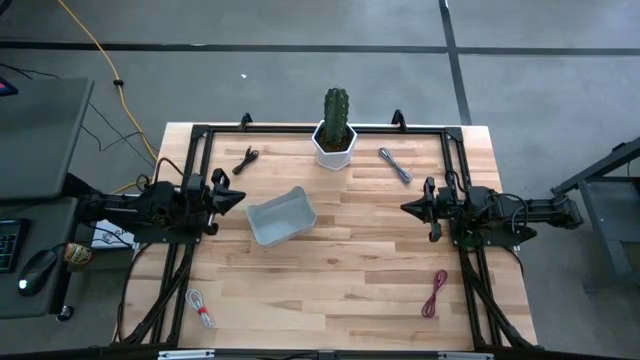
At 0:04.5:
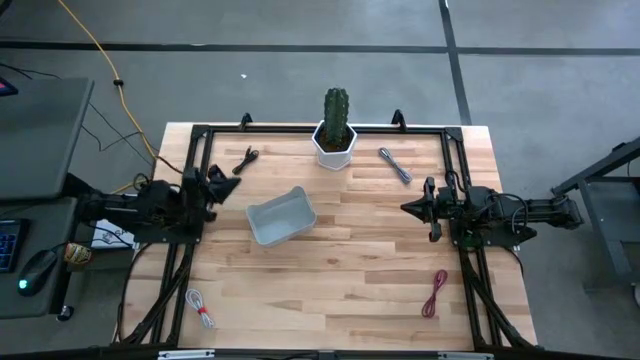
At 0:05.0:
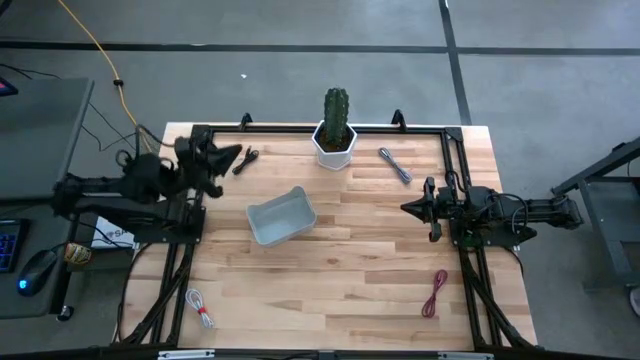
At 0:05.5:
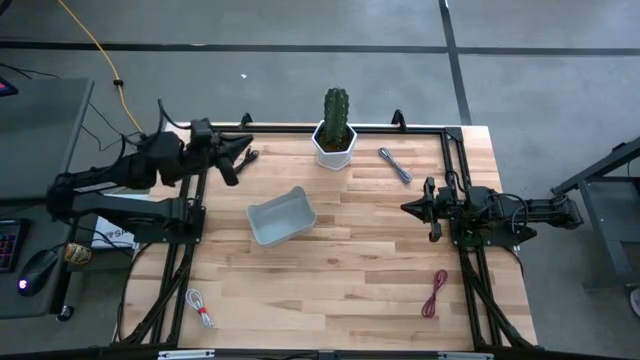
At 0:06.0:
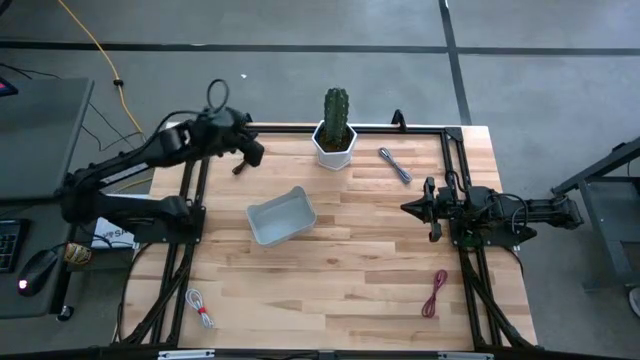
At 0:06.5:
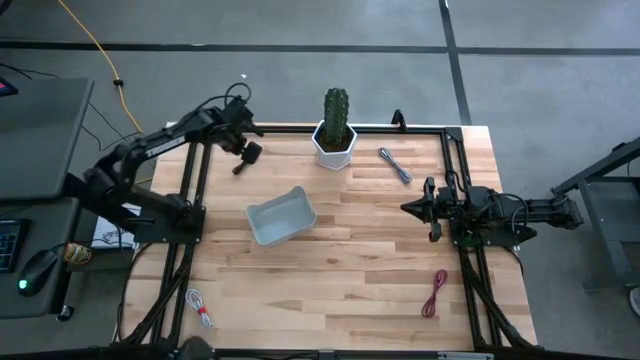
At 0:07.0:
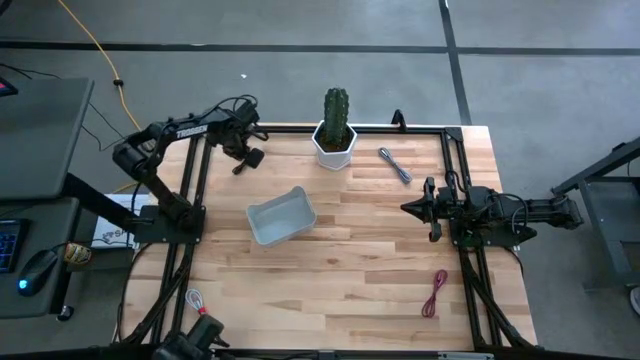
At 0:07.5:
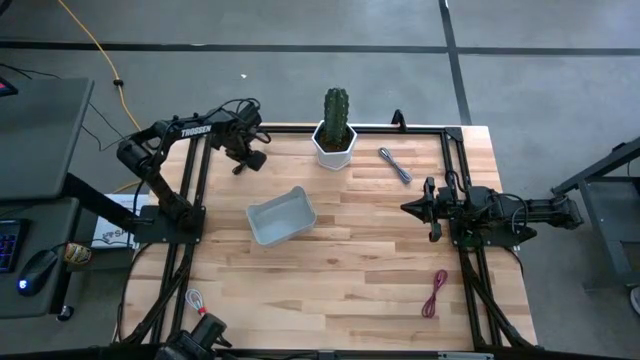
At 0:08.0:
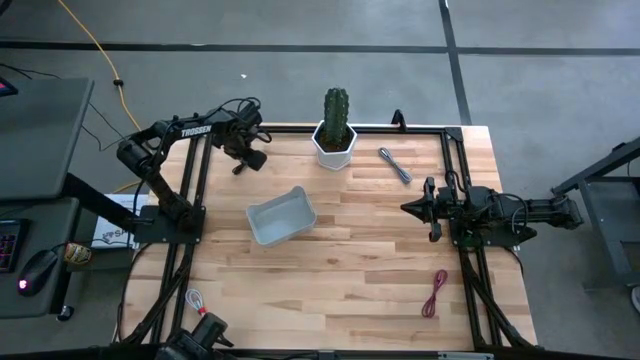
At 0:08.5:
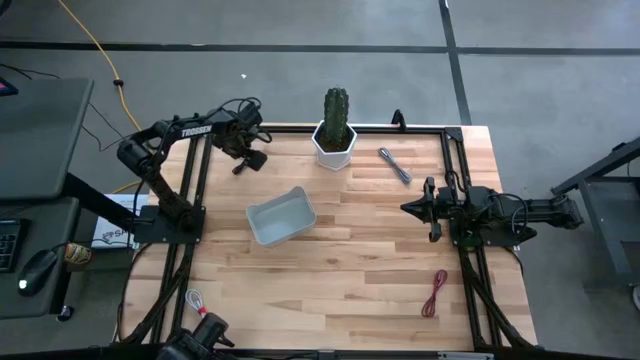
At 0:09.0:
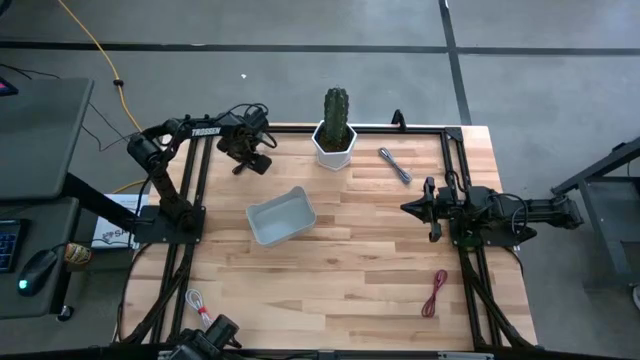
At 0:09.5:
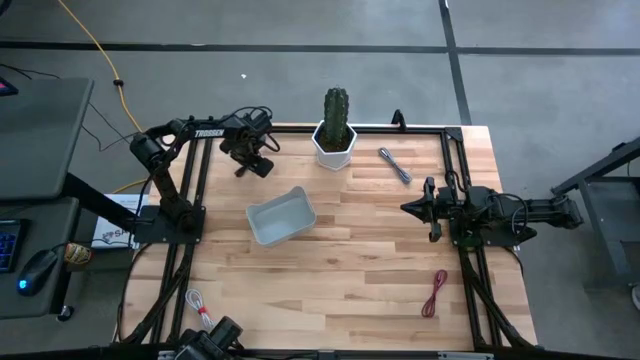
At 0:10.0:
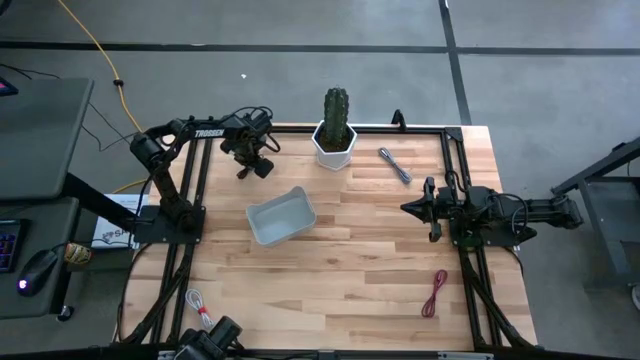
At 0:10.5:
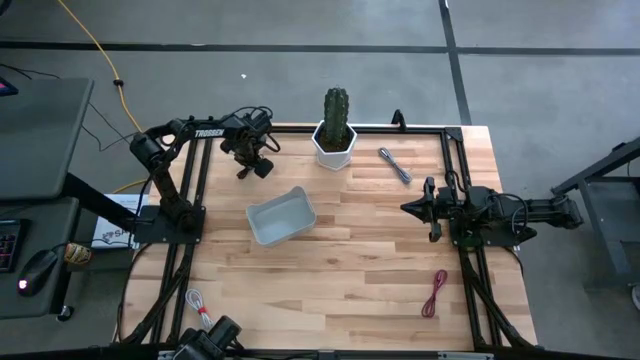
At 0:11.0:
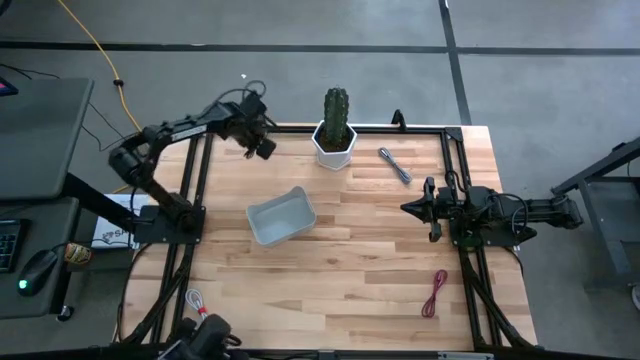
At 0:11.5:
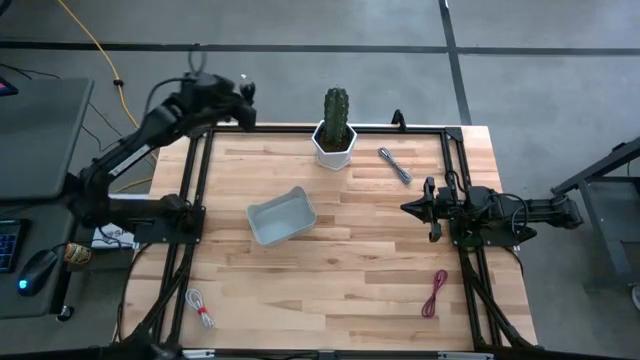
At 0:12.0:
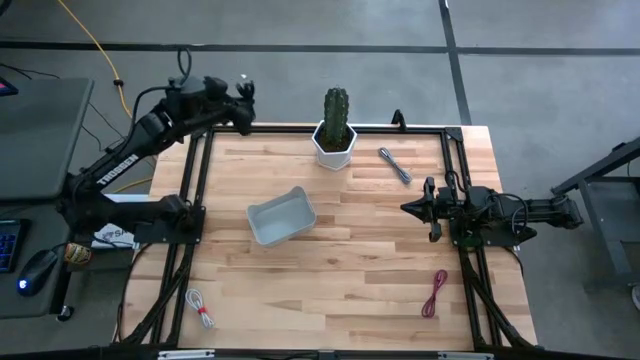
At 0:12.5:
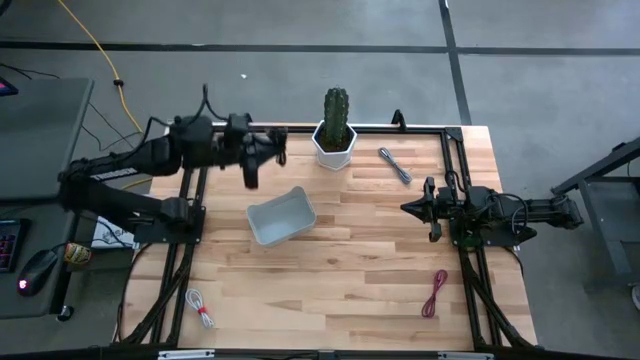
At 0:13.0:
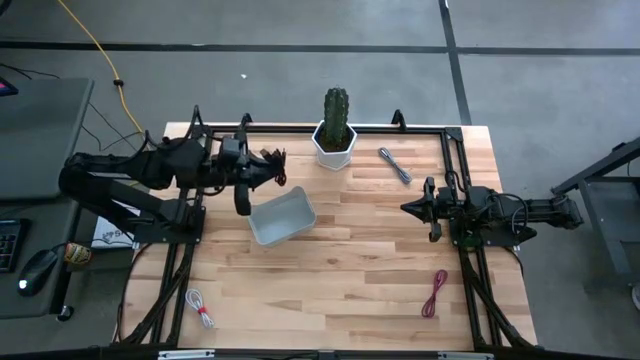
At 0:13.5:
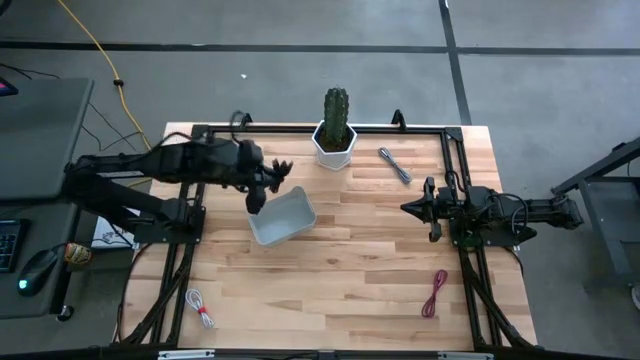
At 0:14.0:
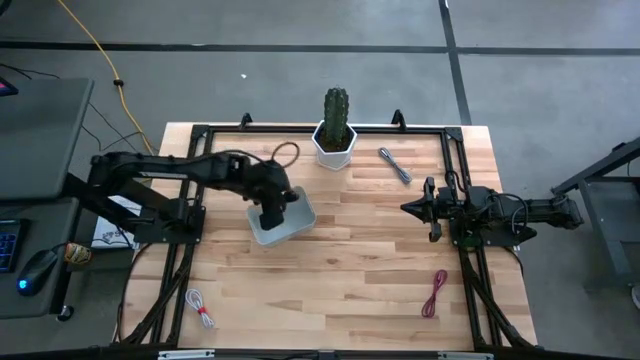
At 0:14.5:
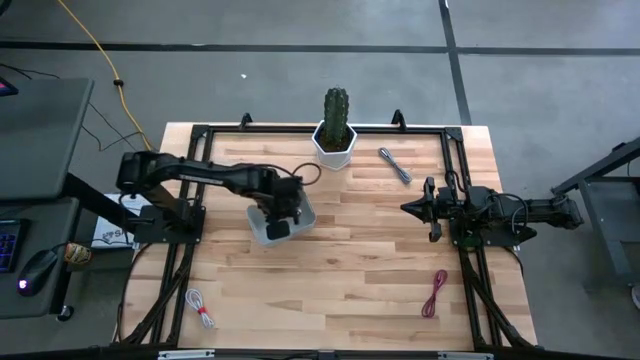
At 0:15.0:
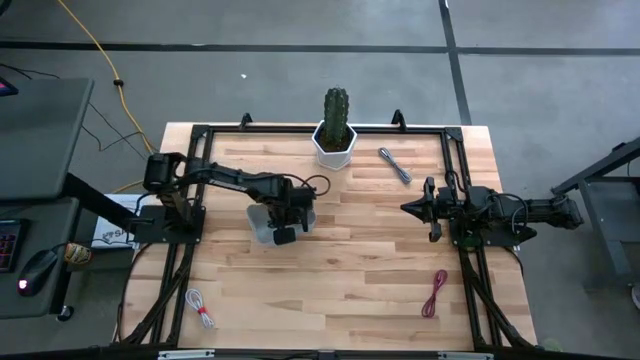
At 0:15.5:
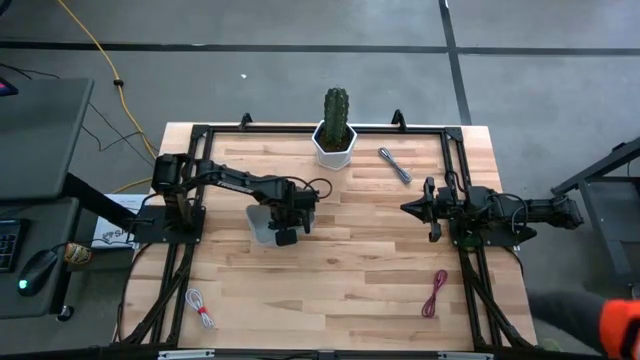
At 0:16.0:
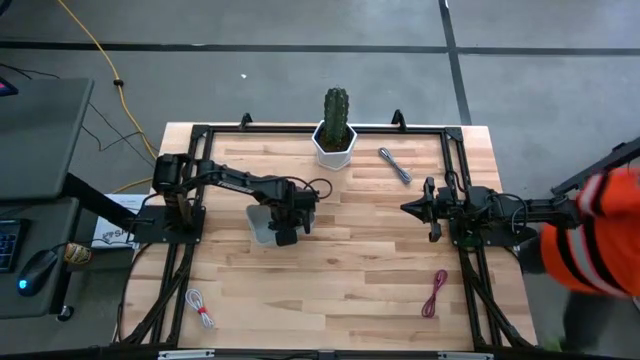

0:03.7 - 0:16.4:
Task: Pick and place USB-C Cables
Put the black charger cable into the gray bin

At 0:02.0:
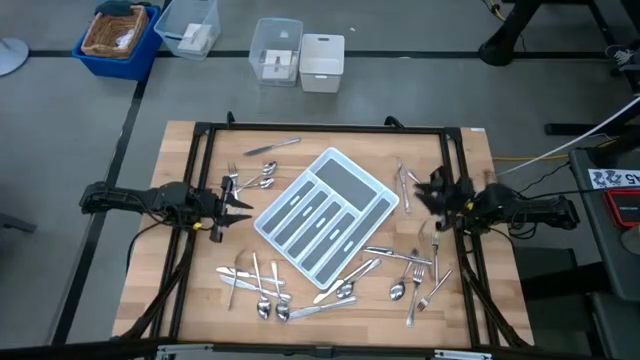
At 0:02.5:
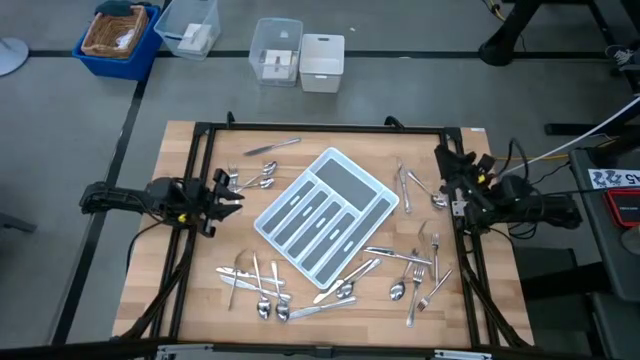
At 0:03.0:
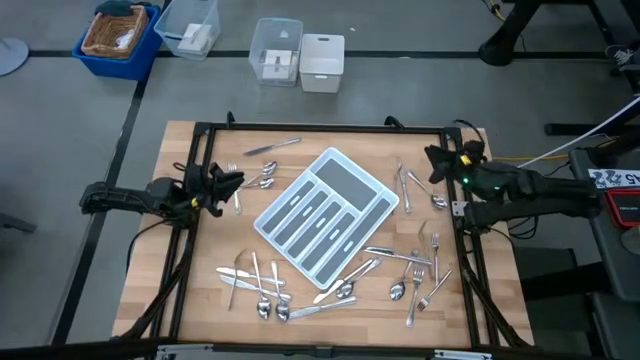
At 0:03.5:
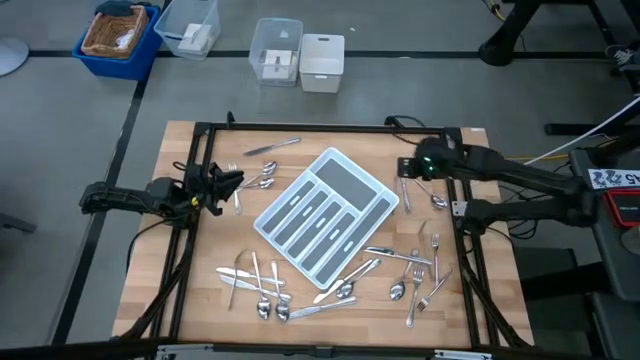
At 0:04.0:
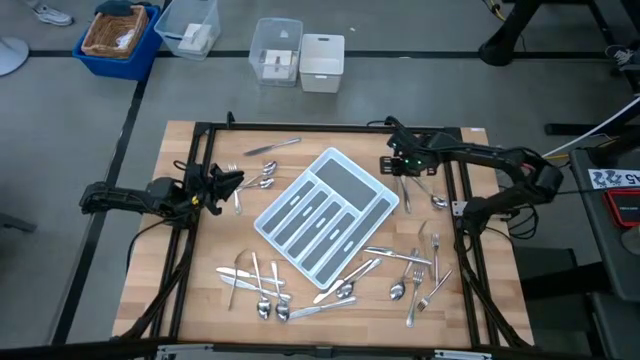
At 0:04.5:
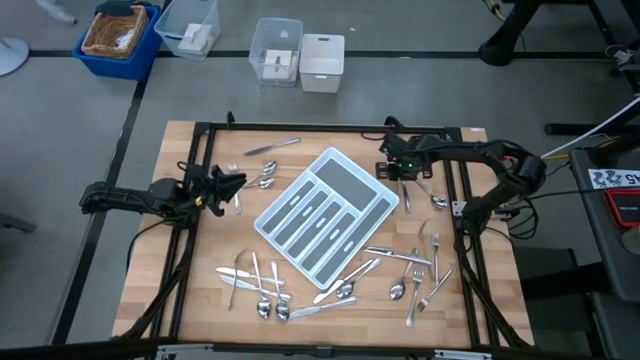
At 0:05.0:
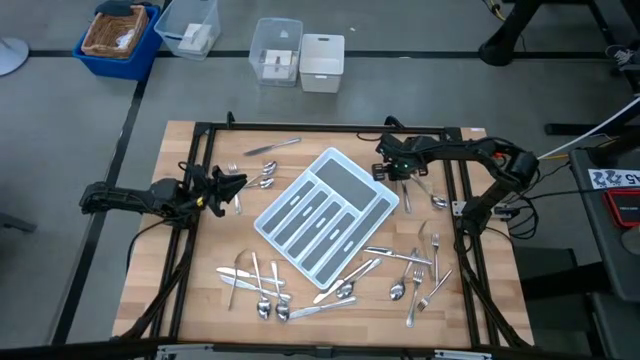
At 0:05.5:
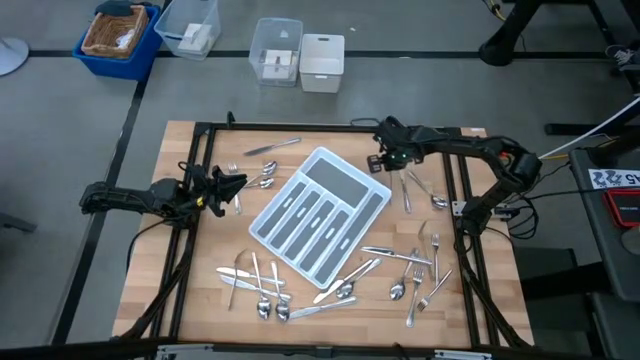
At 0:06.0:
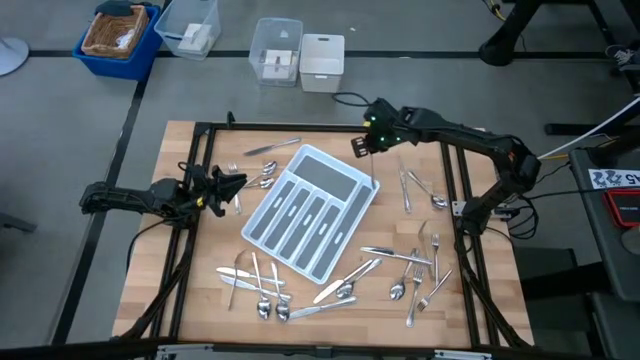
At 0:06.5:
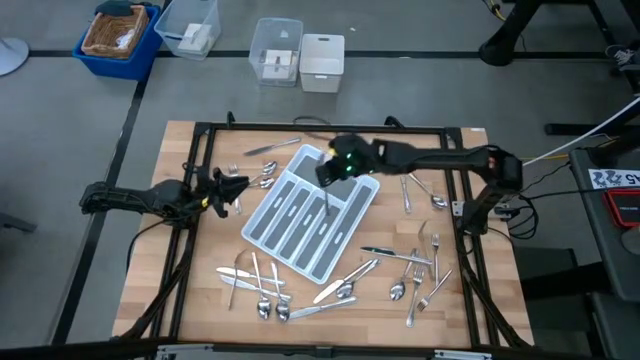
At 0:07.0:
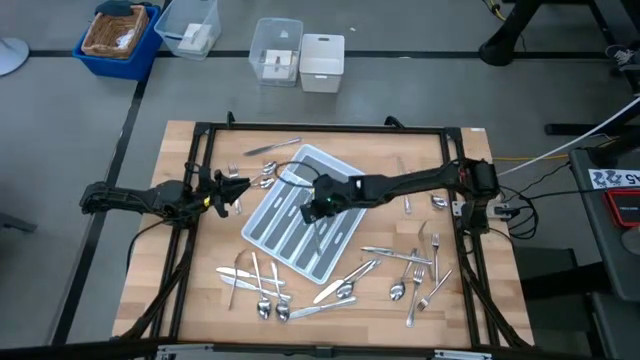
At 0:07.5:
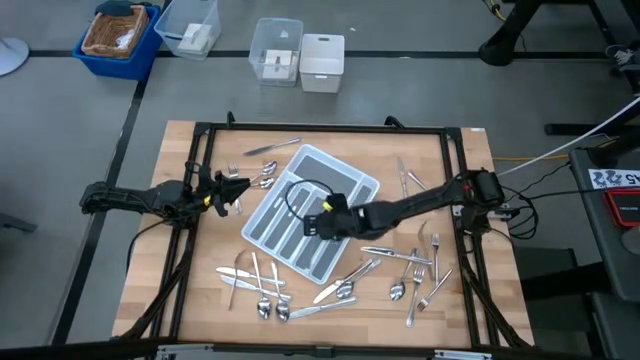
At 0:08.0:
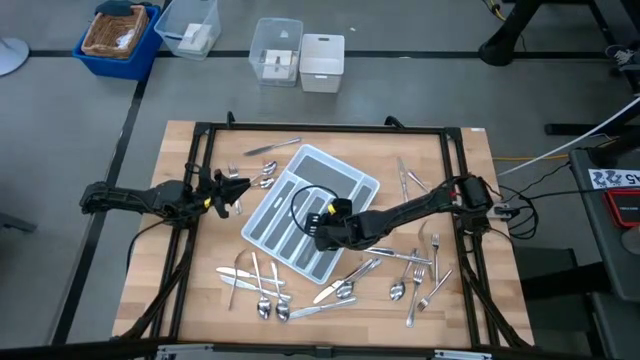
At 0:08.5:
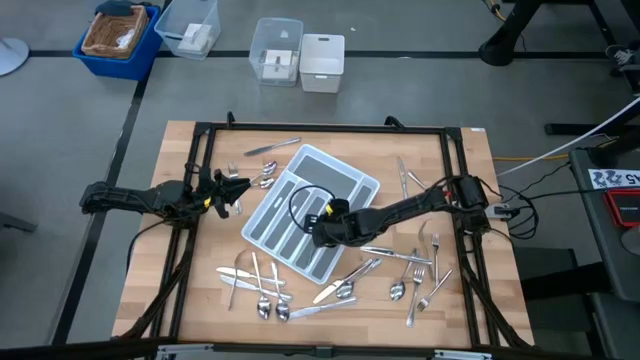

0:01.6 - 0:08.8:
Task: Sort silverware
Put the silver fork into the white cutlery tray
